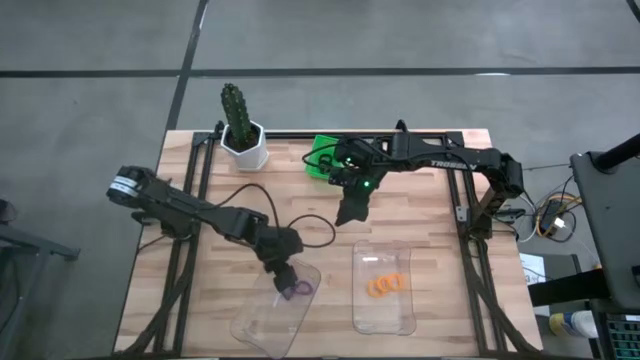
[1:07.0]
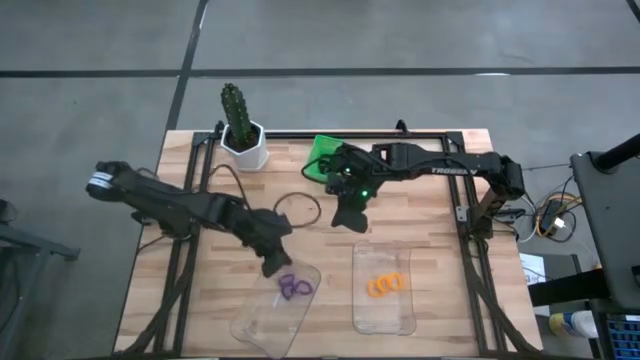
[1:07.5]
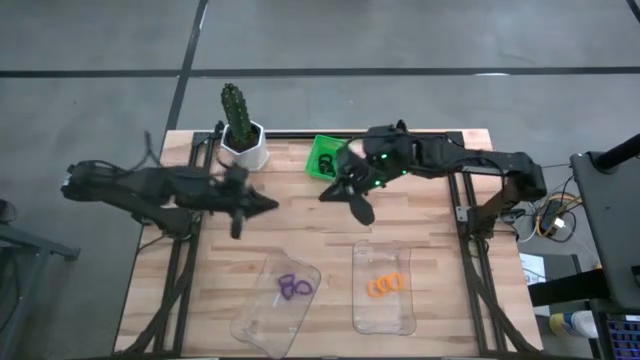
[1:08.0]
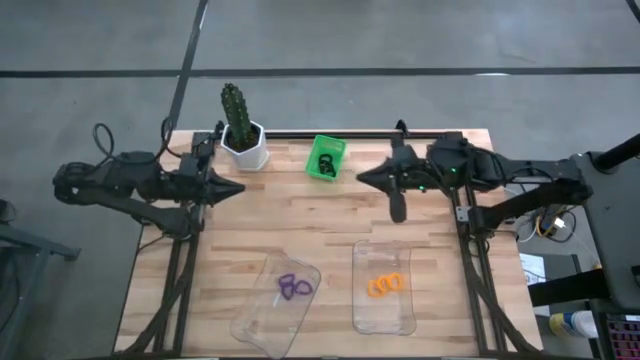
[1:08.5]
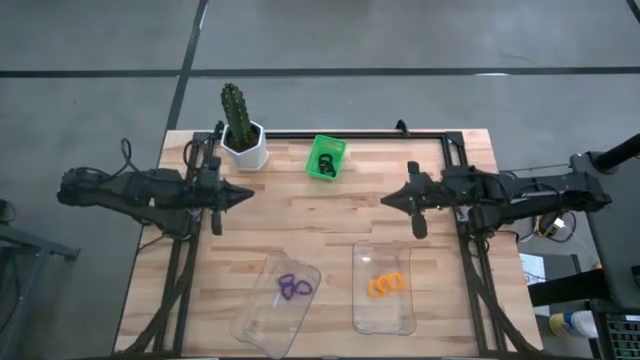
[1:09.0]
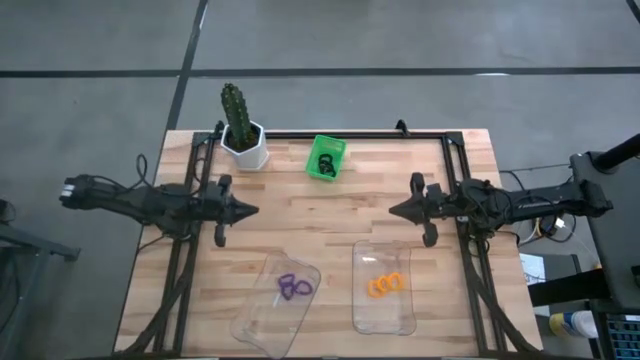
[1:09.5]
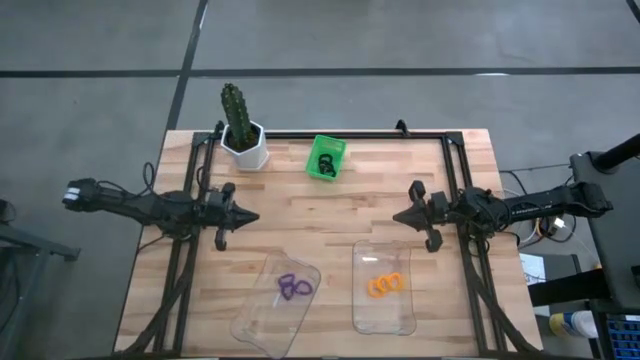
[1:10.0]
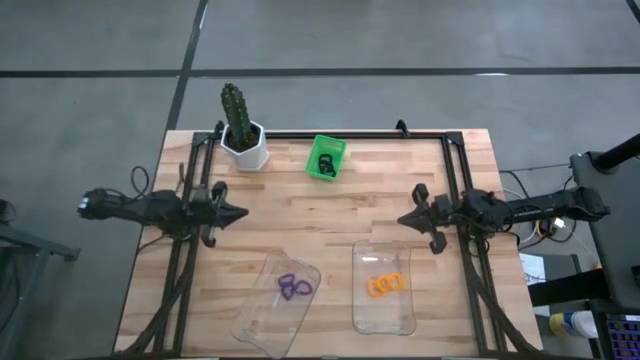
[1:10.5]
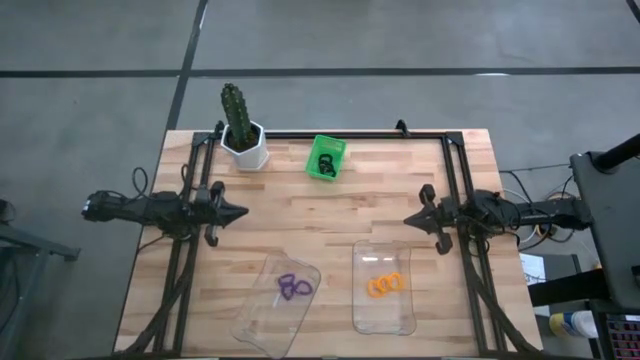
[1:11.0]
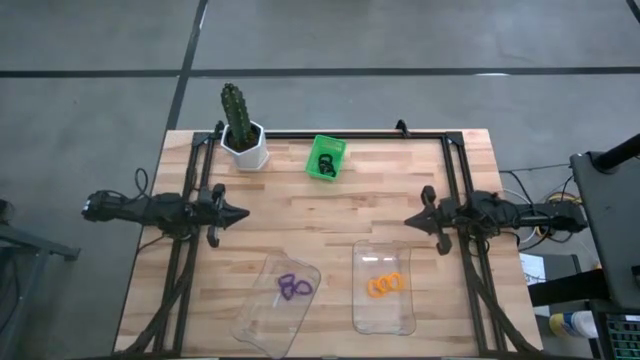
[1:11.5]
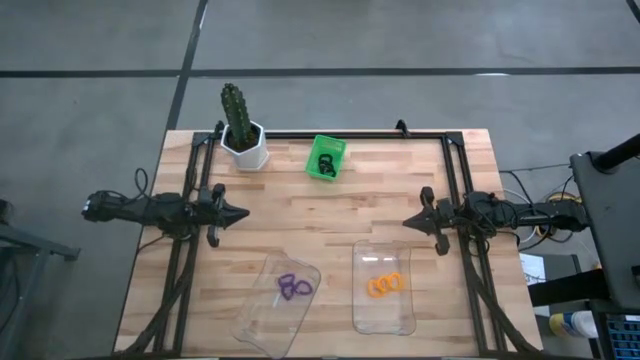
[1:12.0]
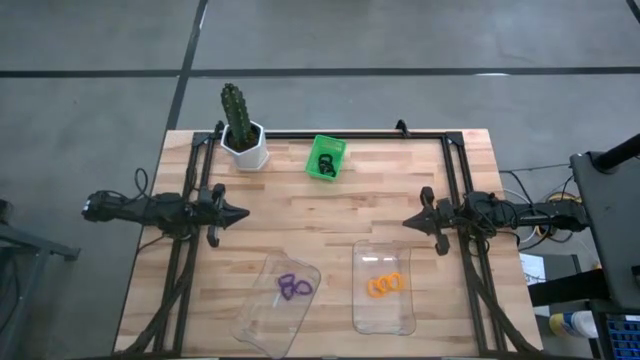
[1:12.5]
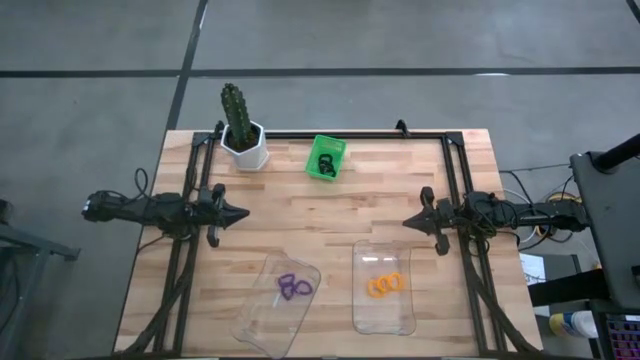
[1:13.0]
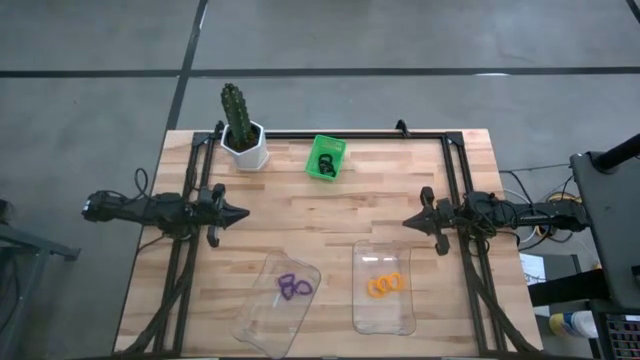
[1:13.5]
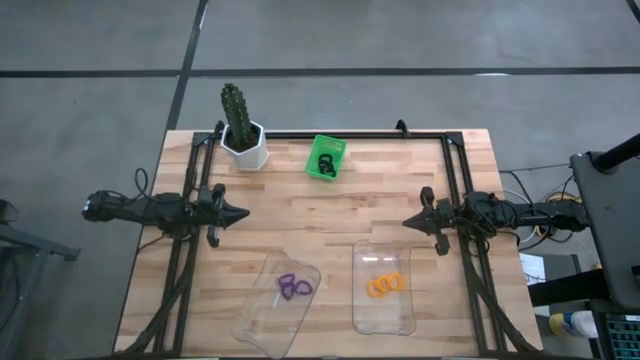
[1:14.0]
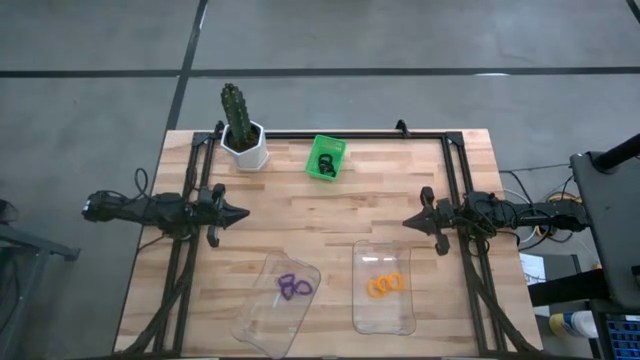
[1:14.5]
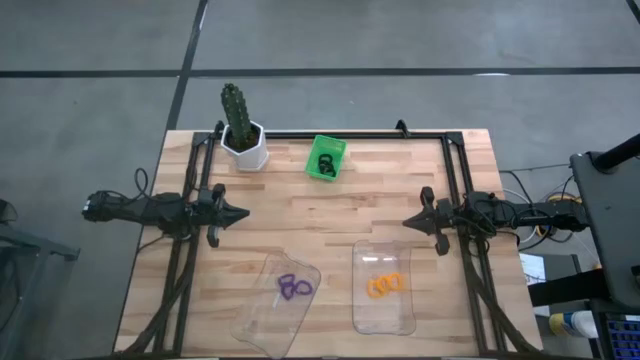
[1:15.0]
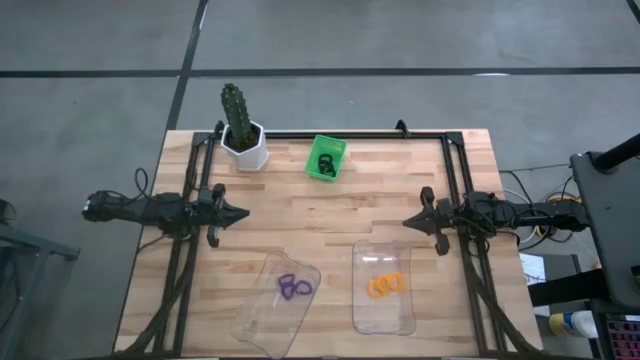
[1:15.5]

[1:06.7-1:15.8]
Task: Sort spring keychains
Return to Home Position

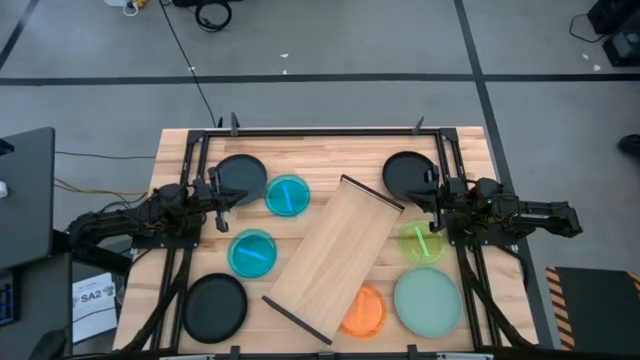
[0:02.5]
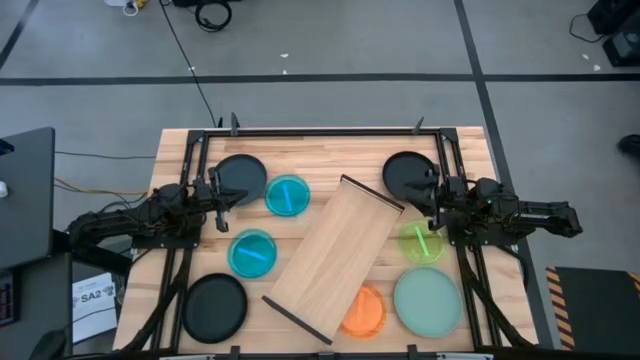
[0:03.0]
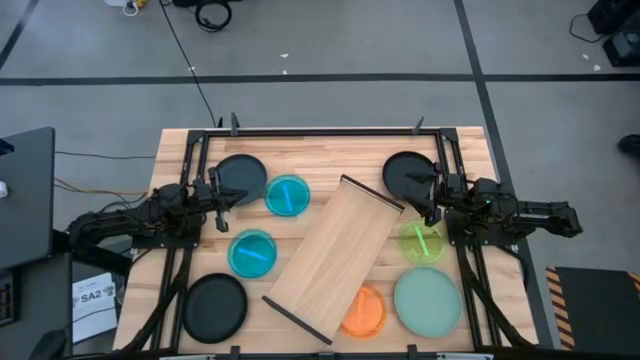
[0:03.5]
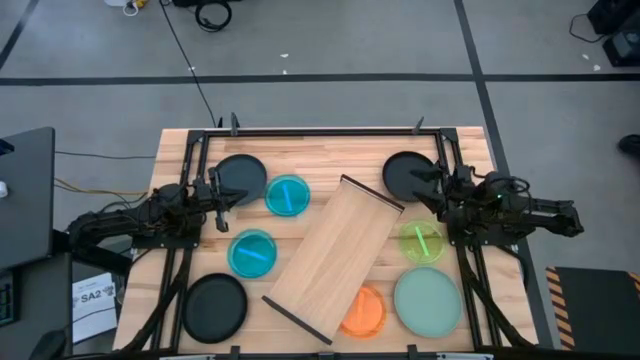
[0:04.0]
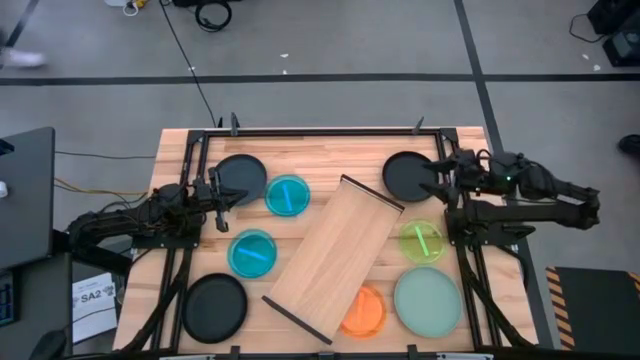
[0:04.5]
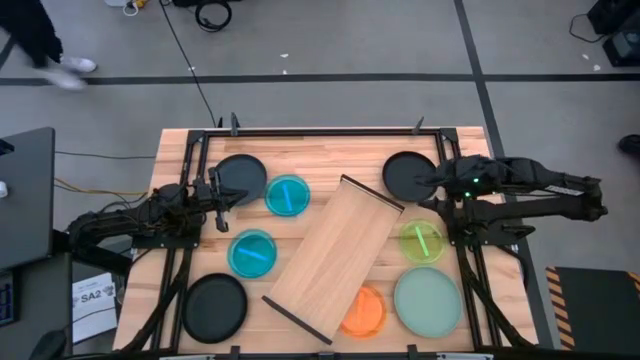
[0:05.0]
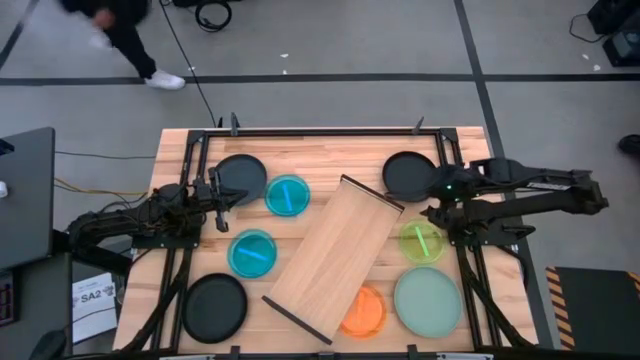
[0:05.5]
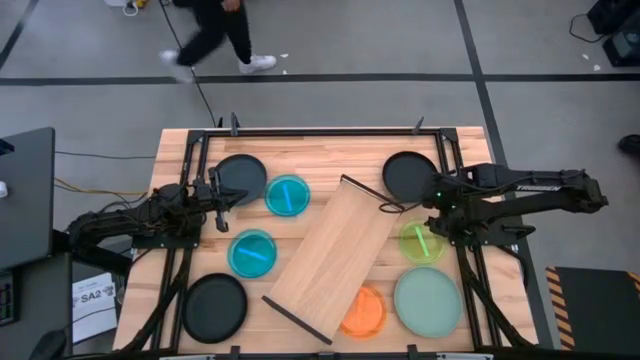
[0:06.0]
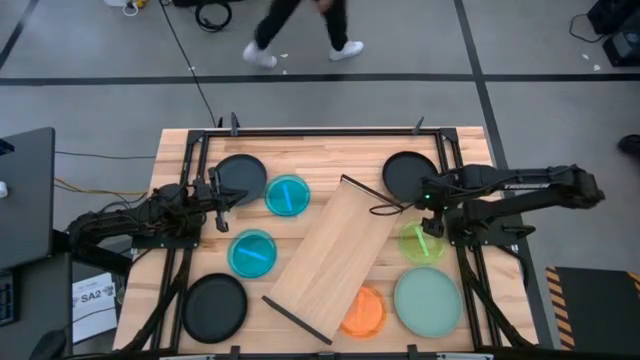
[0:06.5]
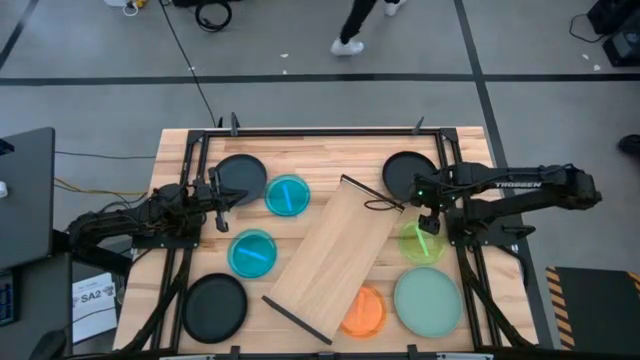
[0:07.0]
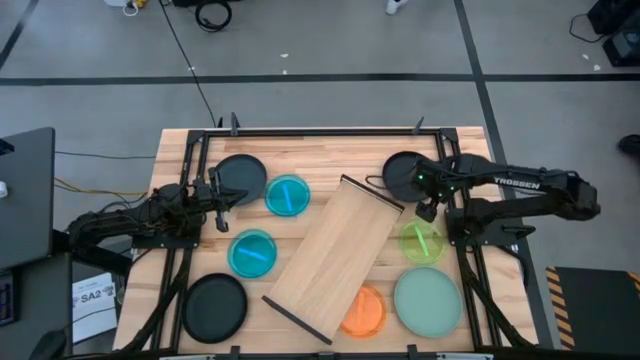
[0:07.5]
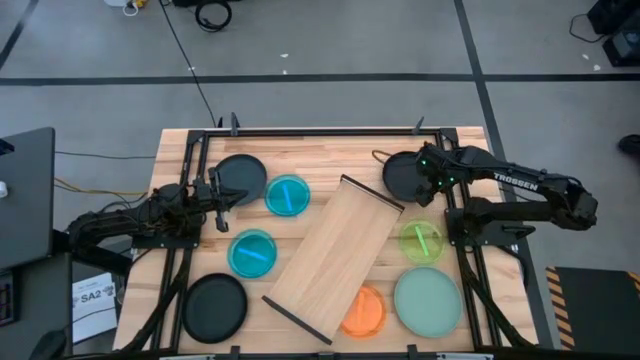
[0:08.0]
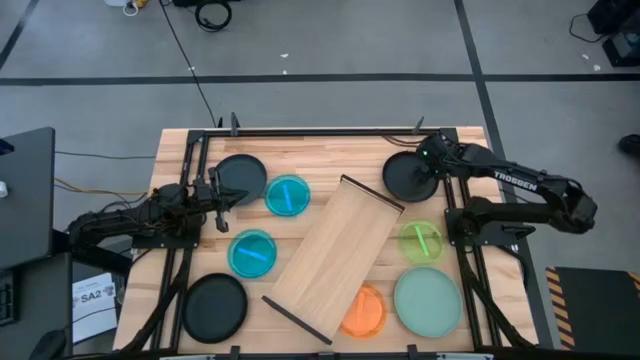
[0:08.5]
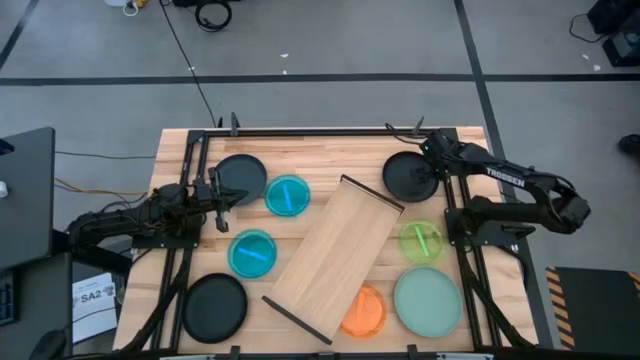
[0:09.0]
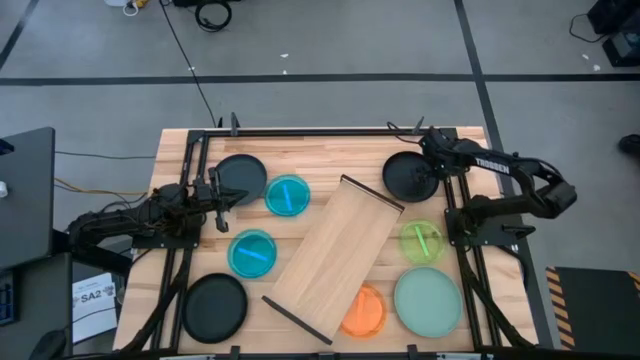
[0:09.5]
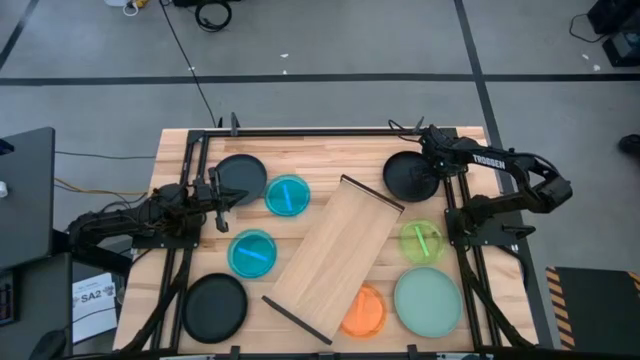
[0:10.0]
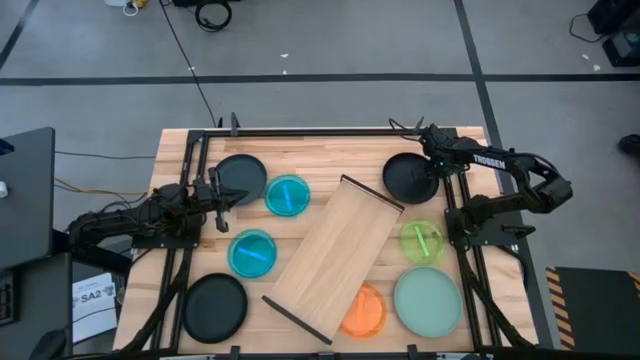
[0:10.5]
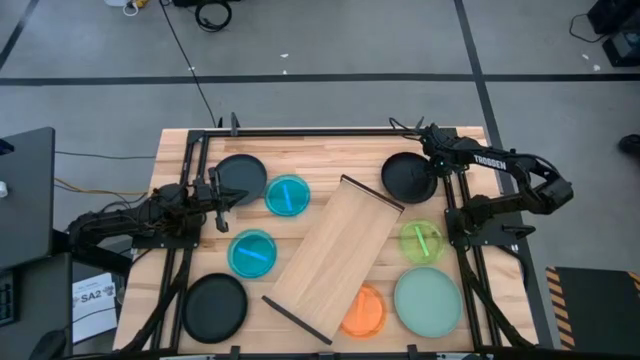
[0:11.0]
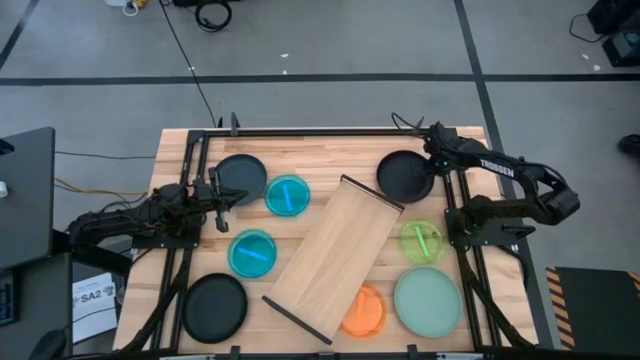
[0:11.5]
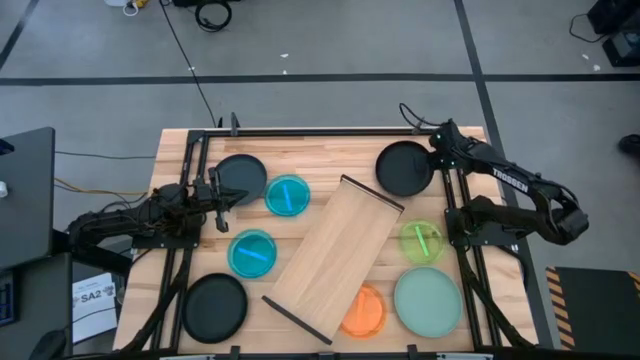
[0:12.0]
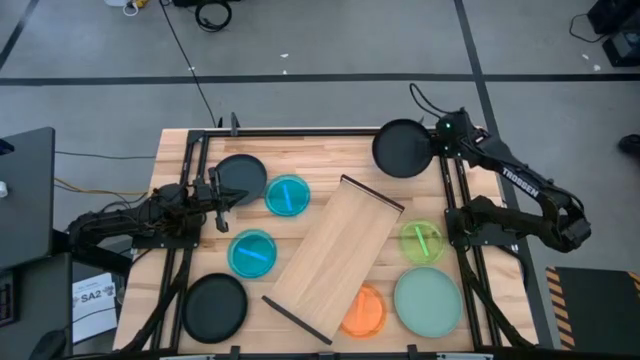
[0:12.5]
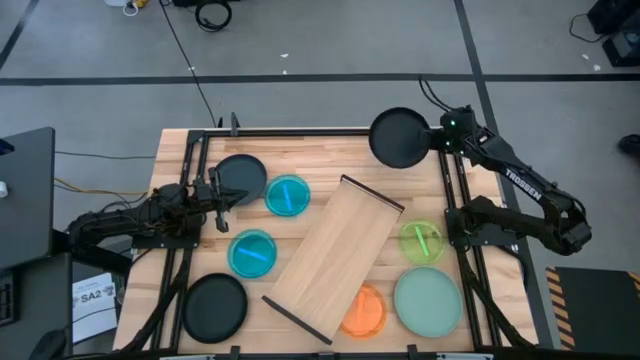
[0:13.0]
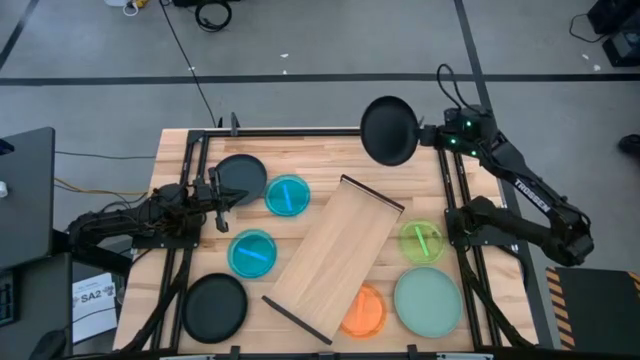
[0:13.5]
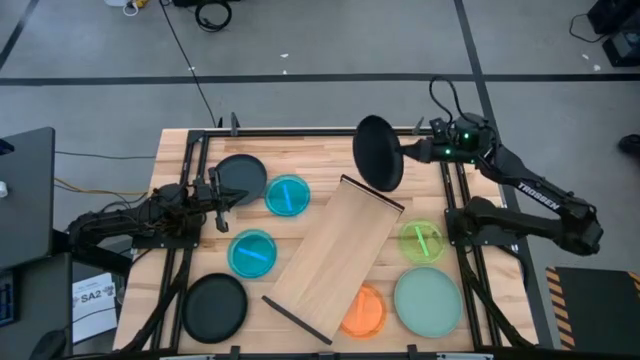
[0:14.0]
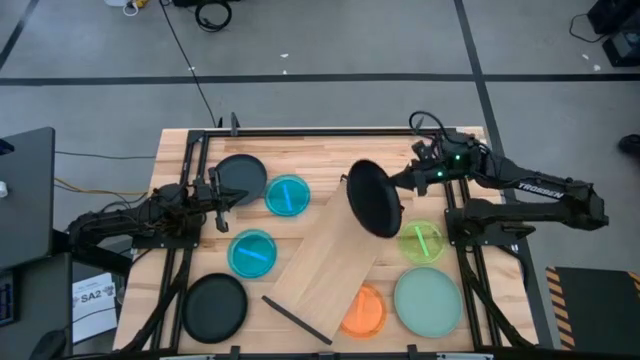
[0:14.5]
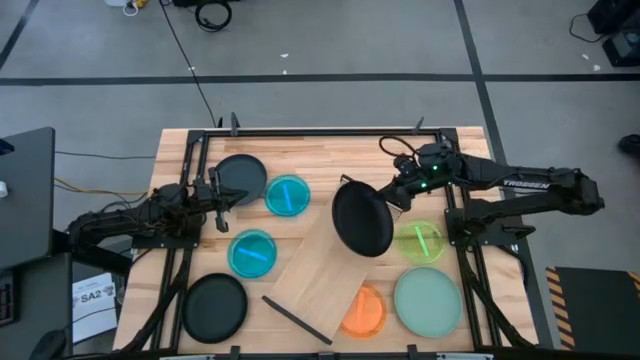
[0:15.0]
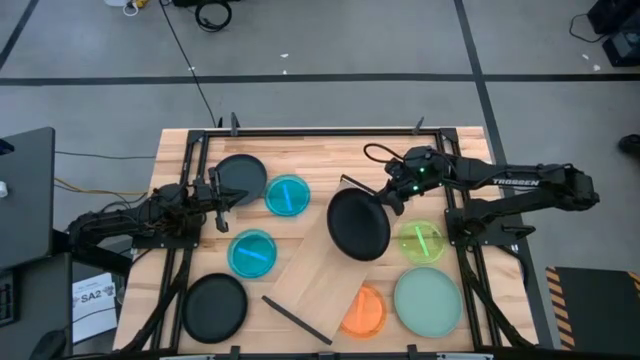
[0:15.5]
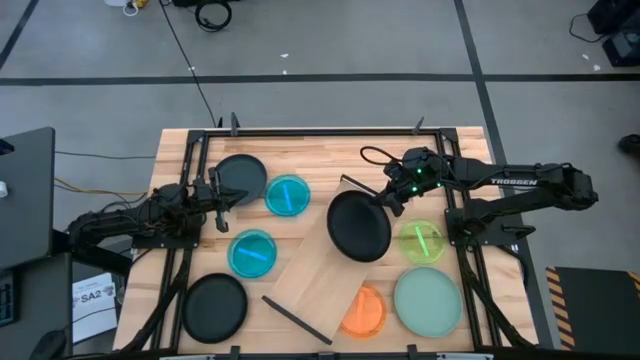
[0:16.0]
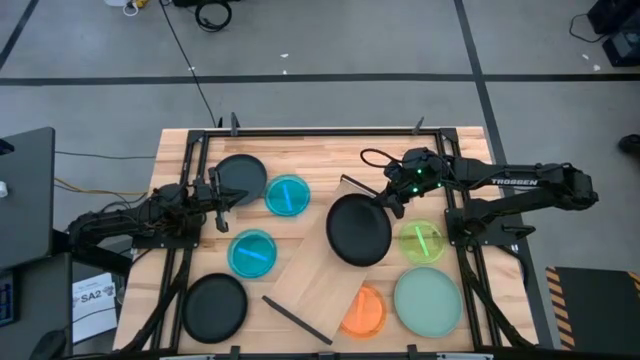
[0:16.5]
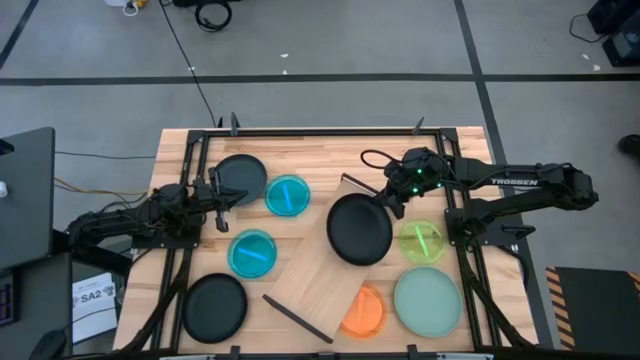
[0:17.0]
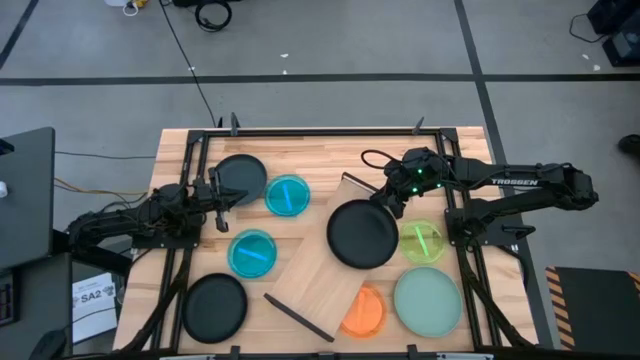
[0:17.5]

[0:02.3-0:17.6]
Task: Place and stack plates onto a shelf
Put the top right black plate on the shelf
